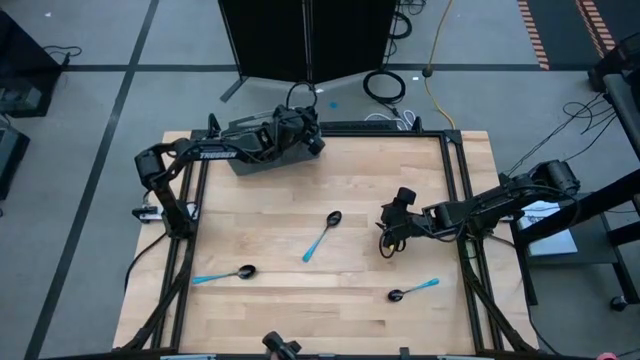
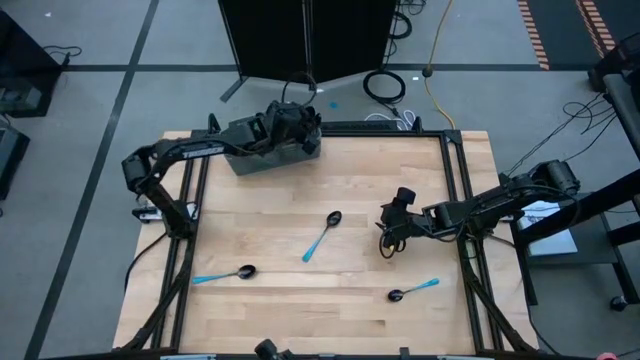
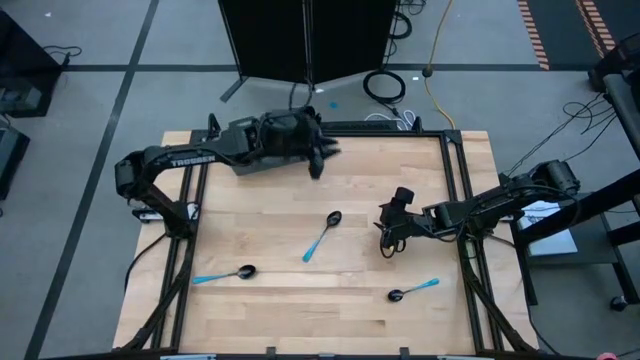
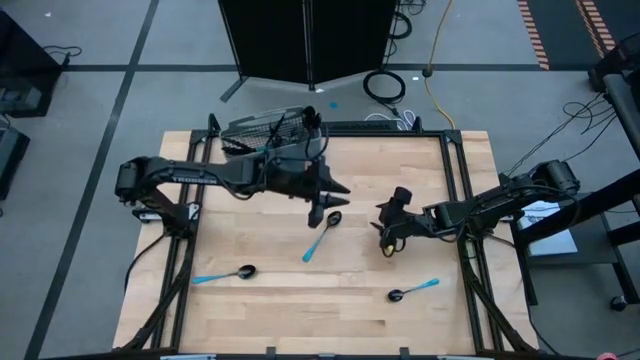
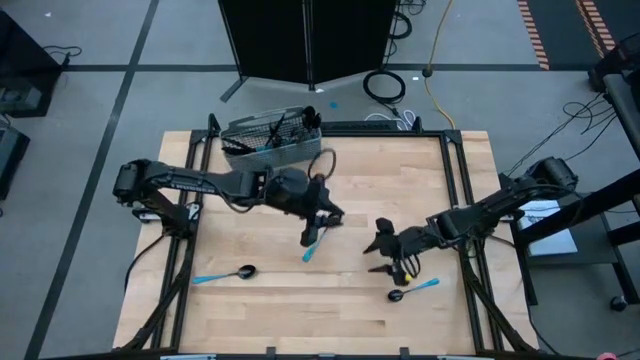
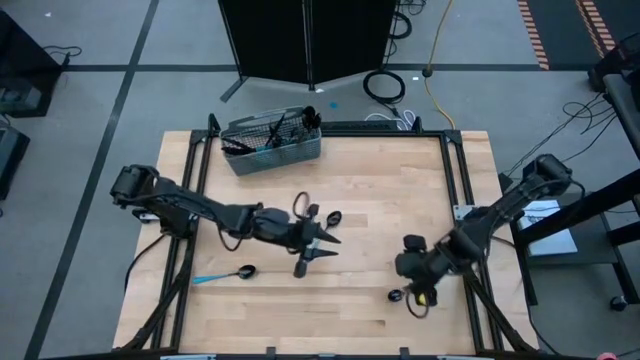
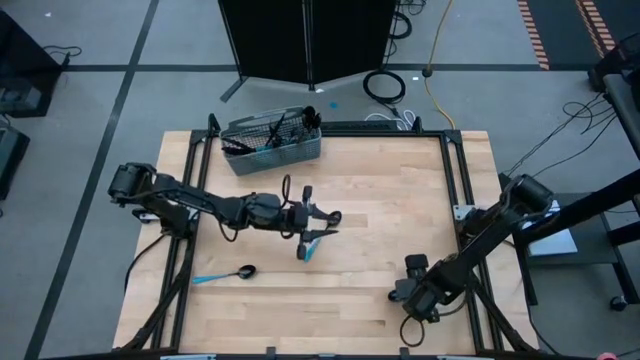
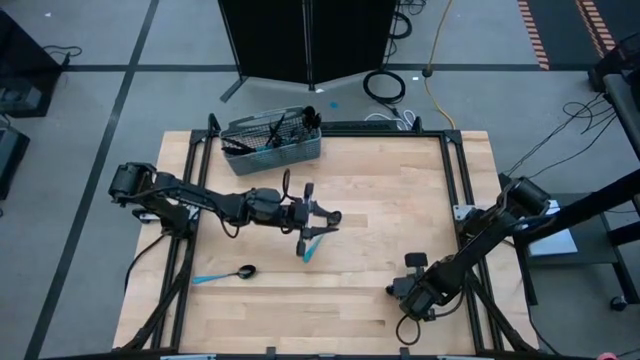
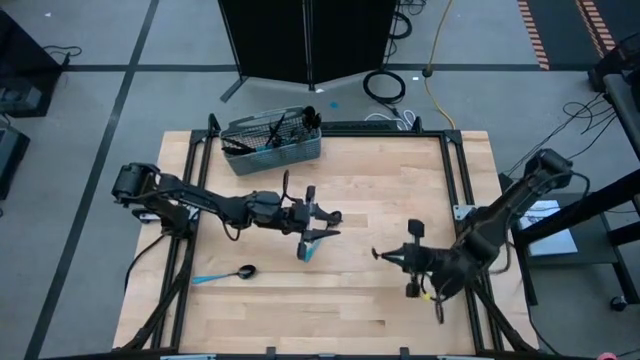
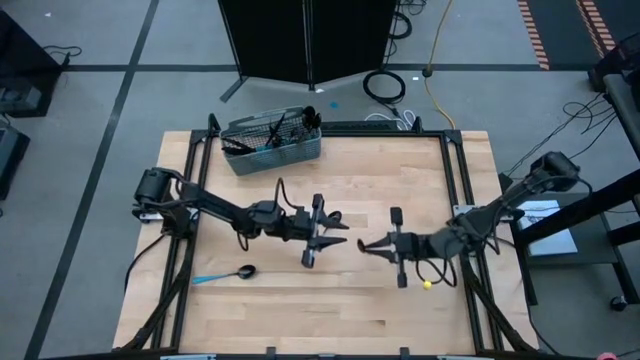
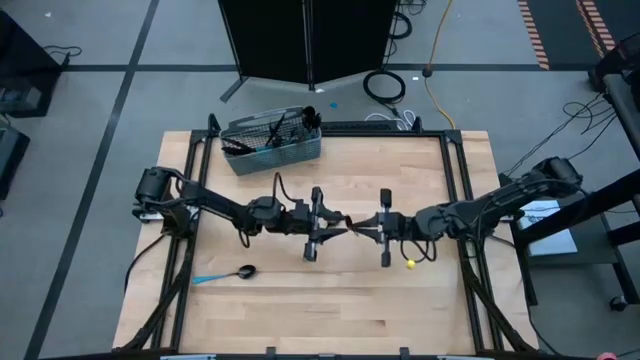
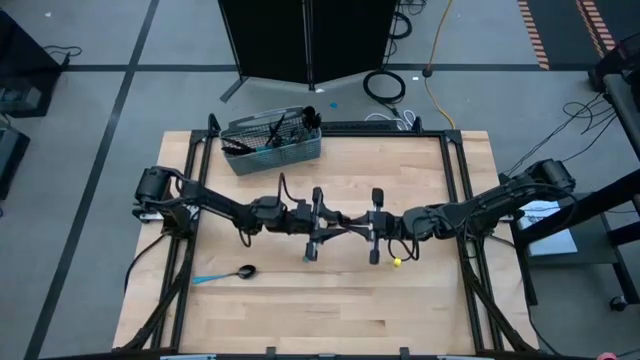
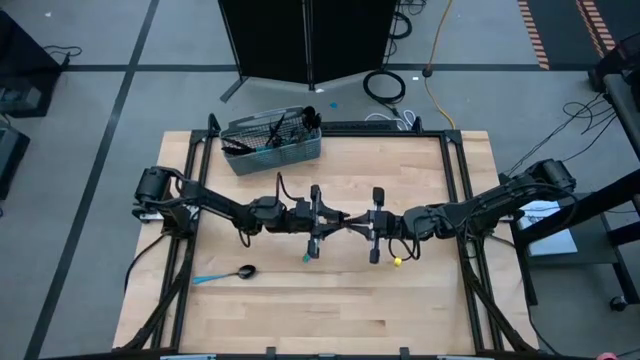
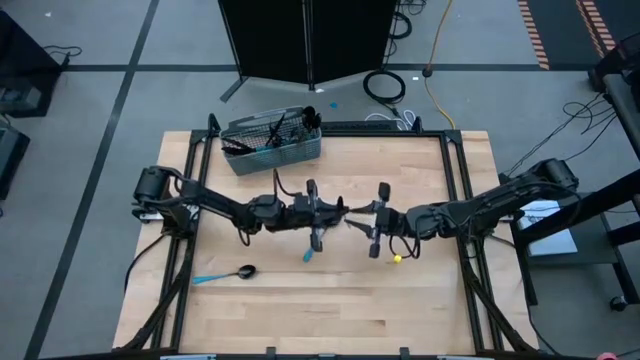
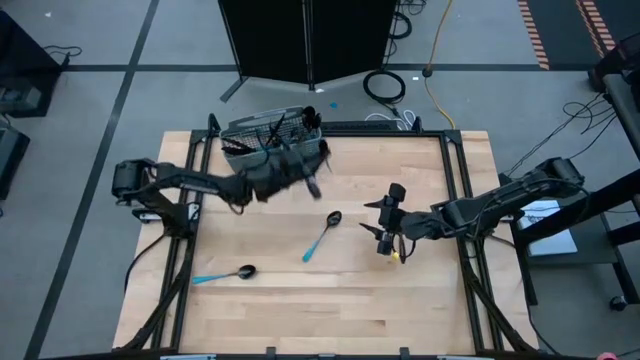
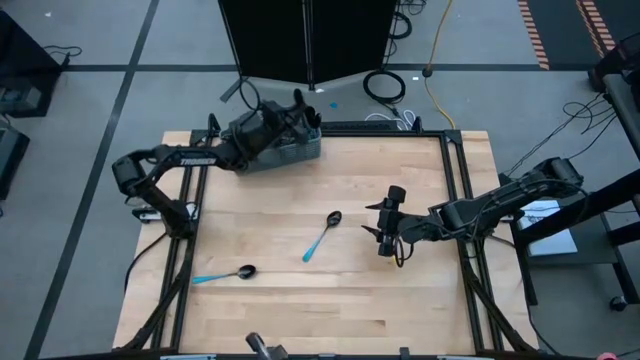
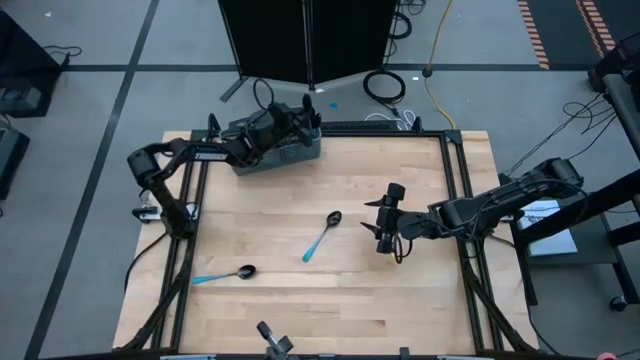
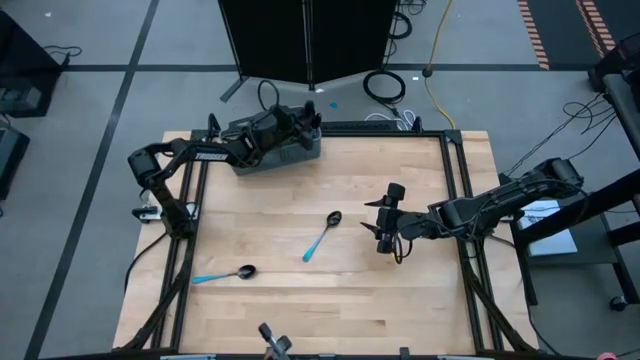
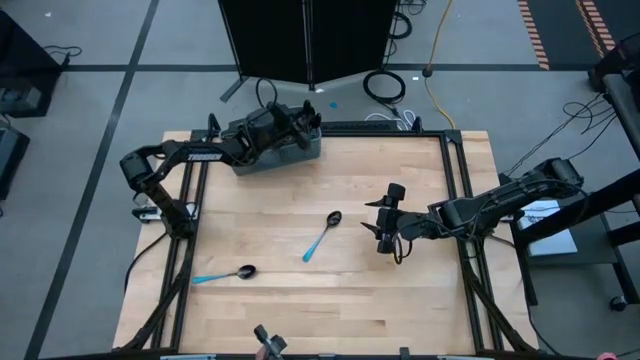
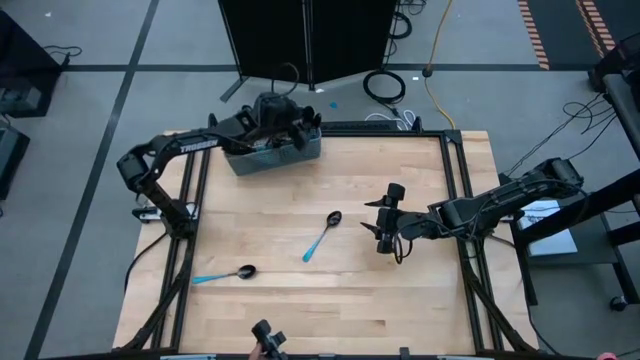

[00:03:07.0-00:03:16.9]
Task: Sort silverware
Put the blue spoon into the silverware basket

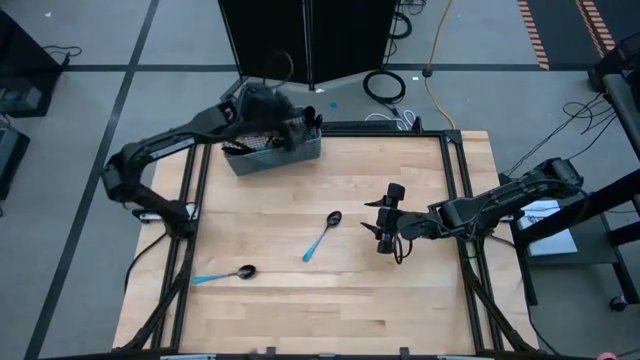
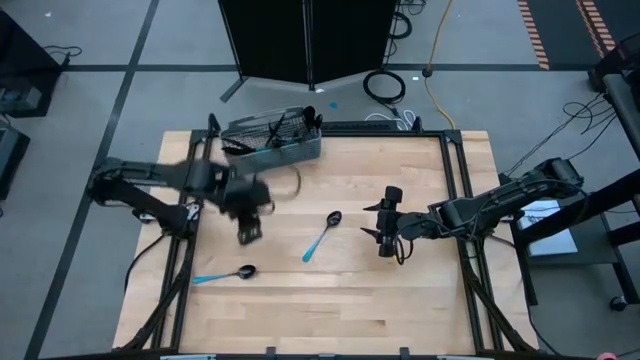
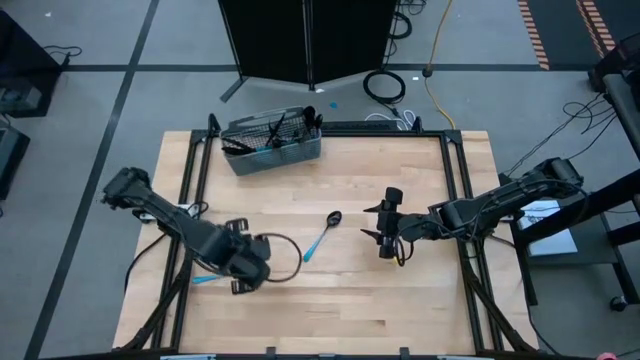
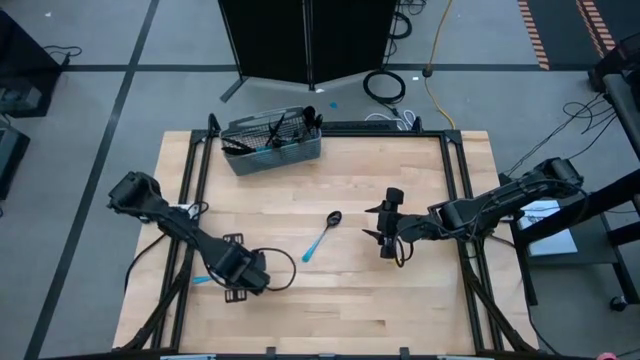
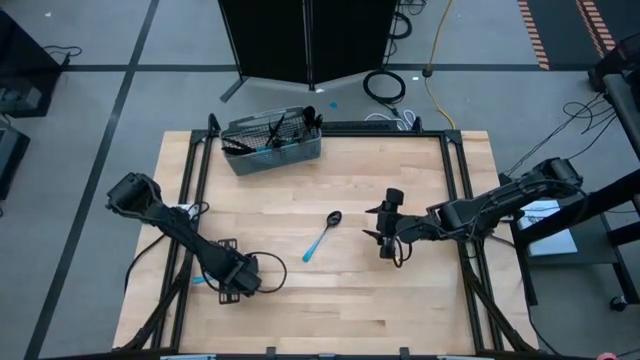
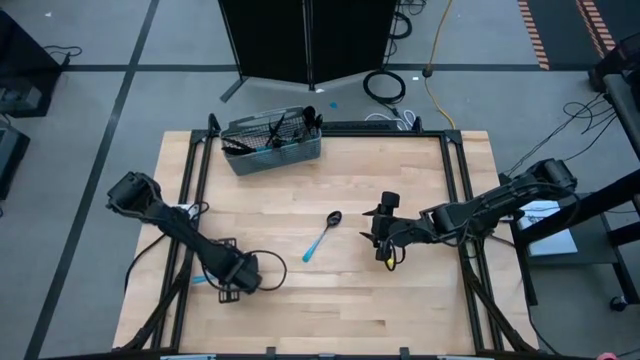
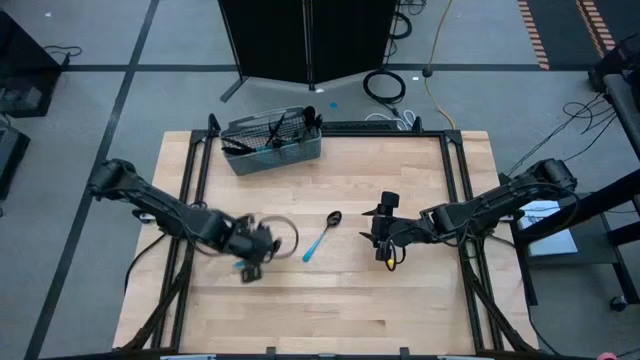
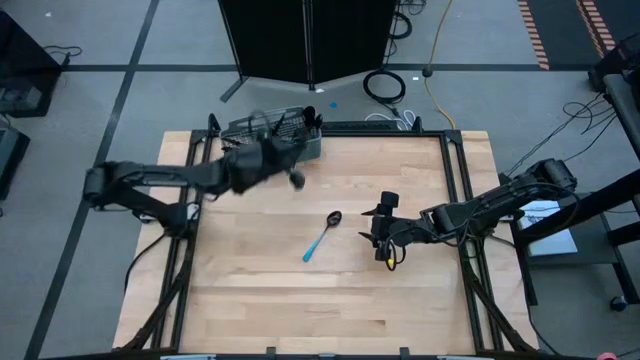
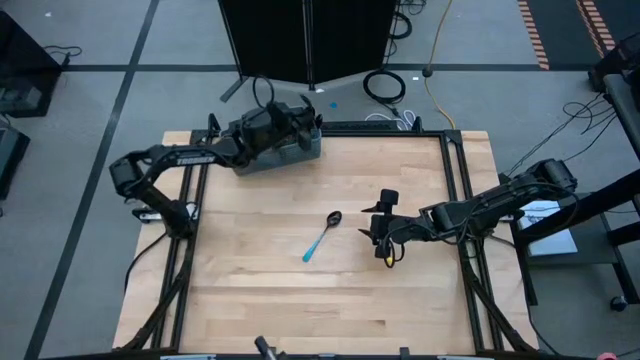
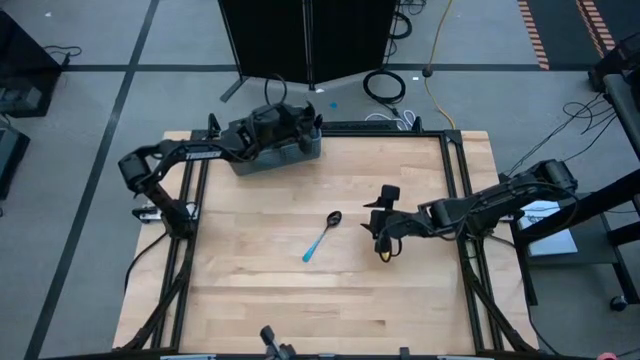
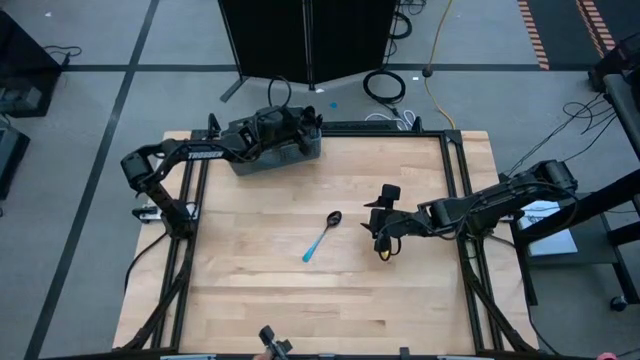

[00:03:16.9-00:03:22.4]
Put the blue spoon into the silverware basket

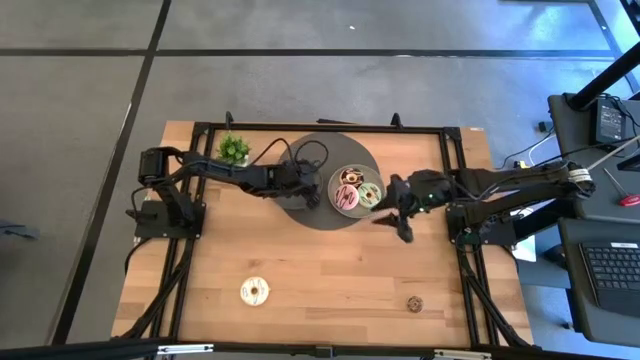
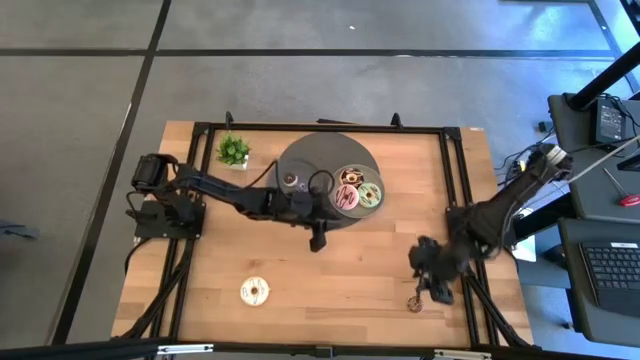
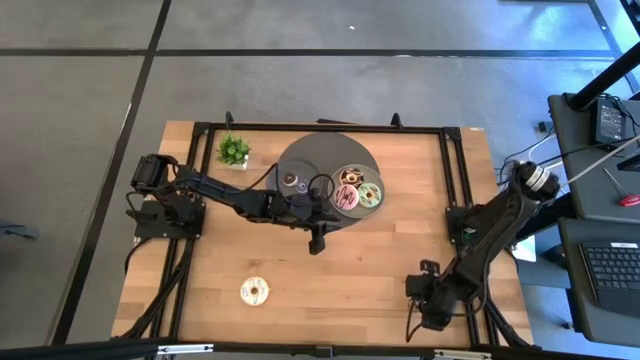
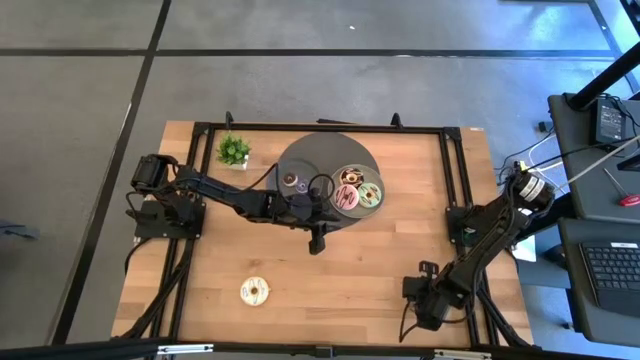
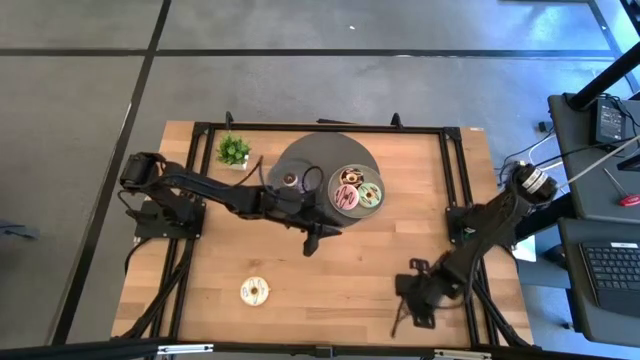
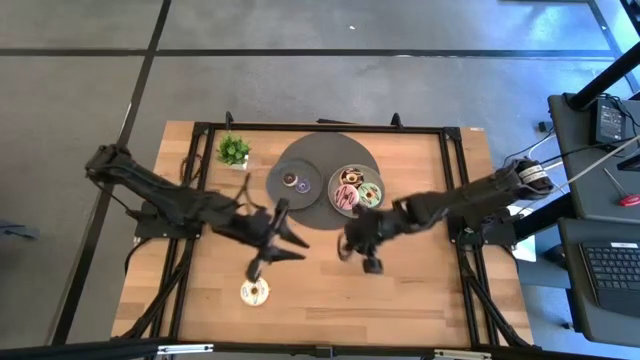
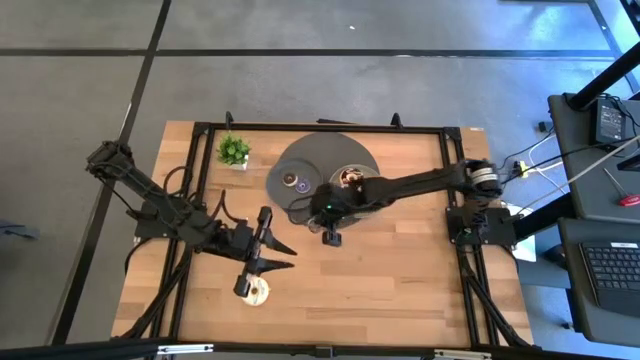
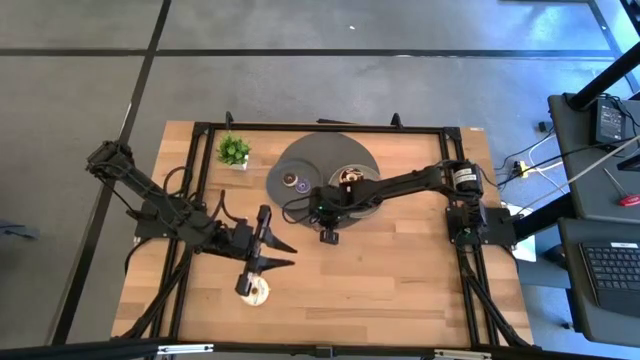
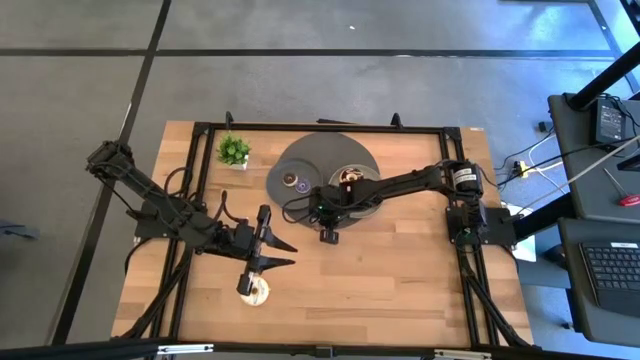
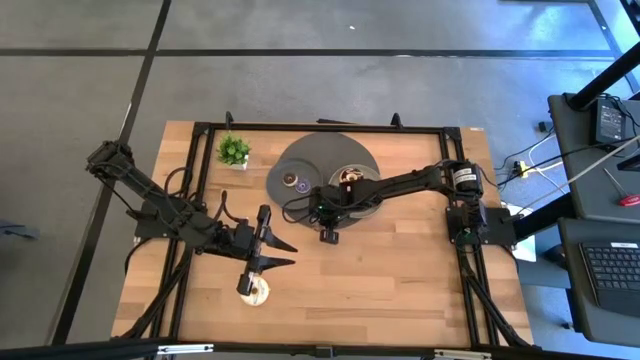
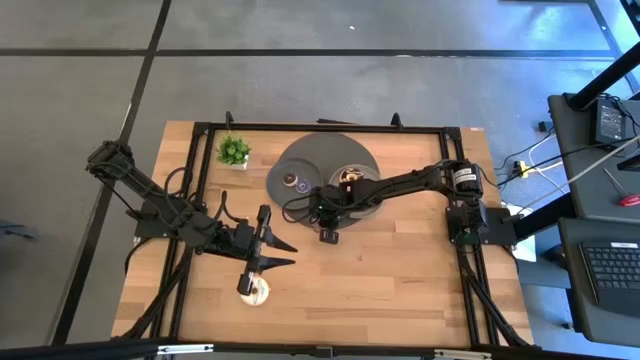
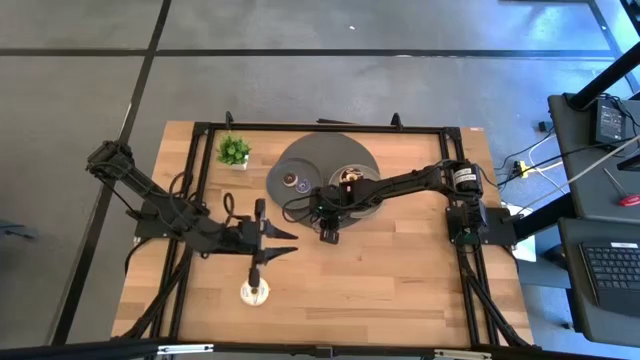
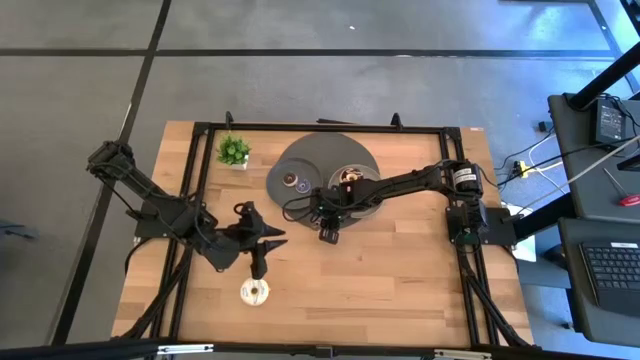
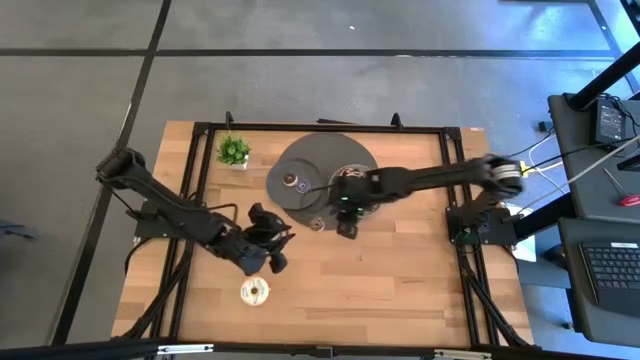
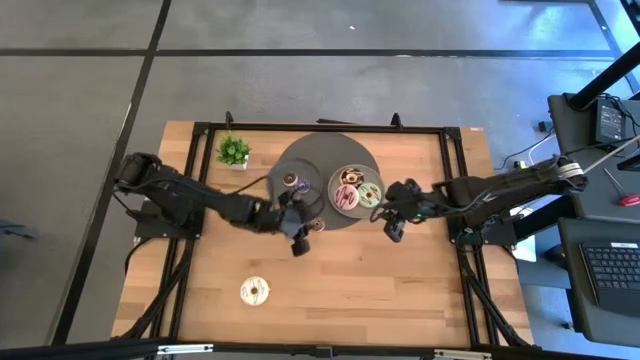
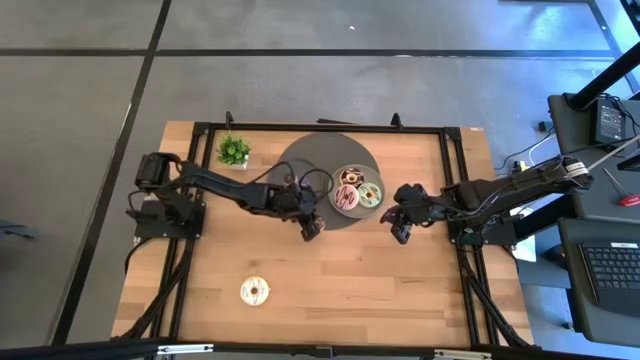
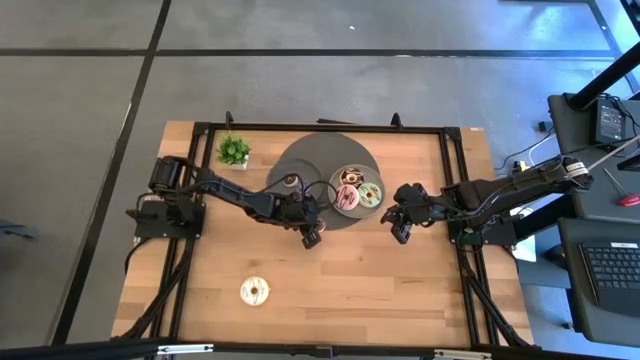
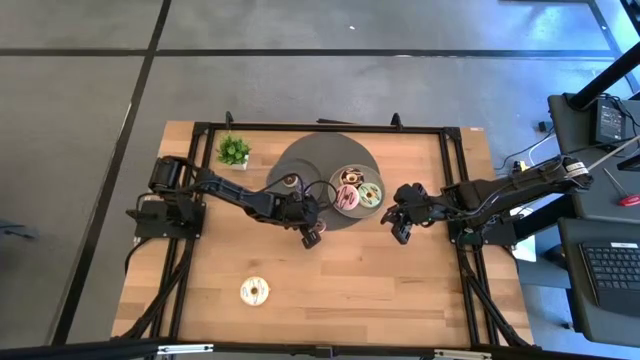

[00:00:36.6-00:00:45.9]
Task: Pick & Place donuts
Put the small brown donut on the dark gray plate
